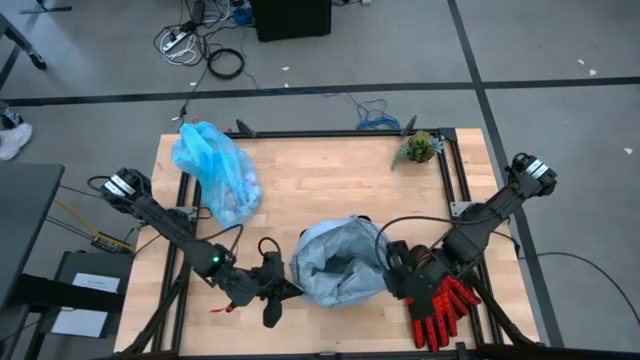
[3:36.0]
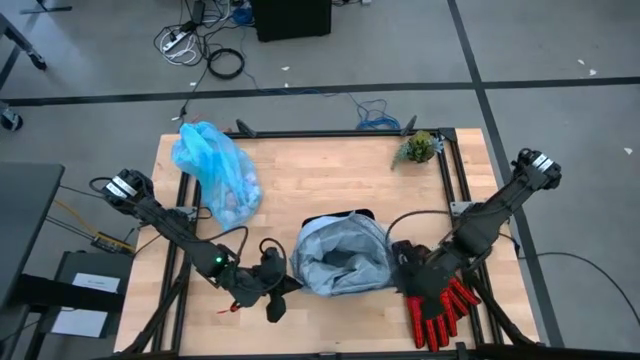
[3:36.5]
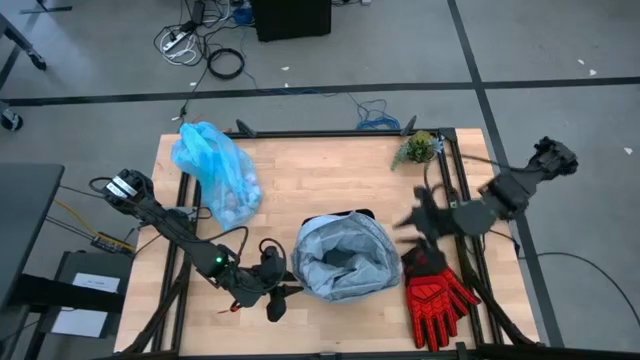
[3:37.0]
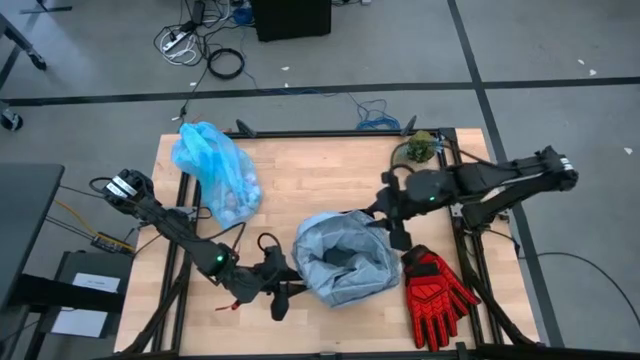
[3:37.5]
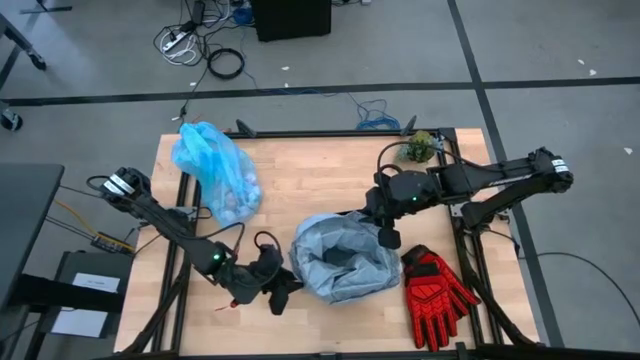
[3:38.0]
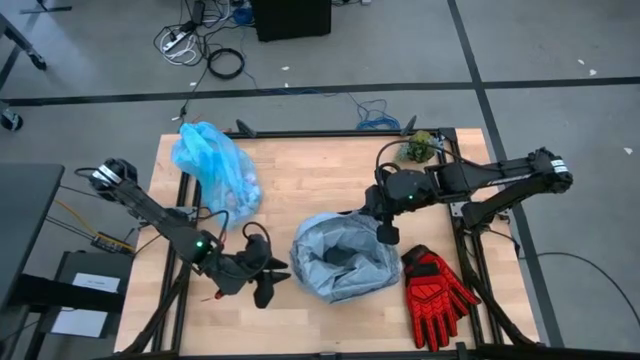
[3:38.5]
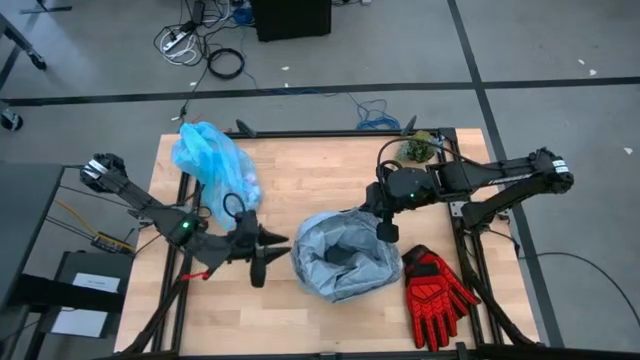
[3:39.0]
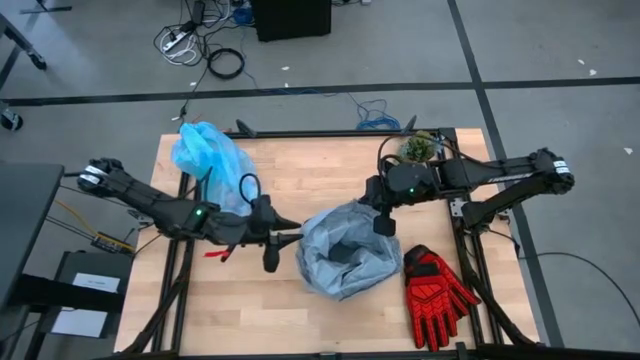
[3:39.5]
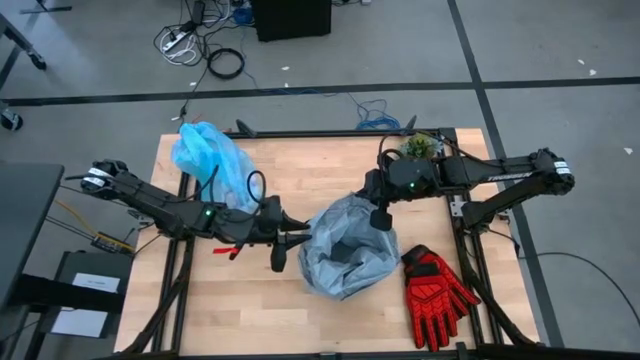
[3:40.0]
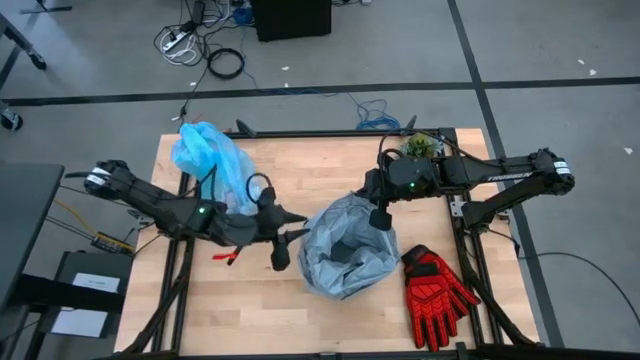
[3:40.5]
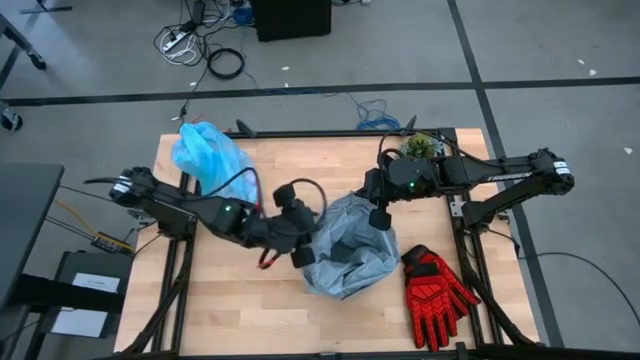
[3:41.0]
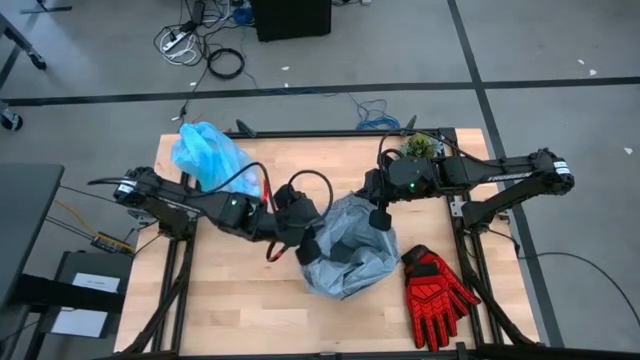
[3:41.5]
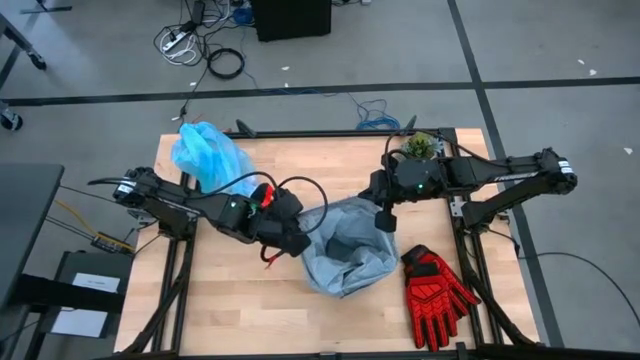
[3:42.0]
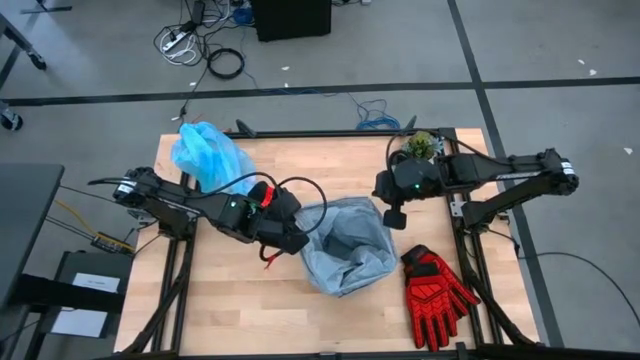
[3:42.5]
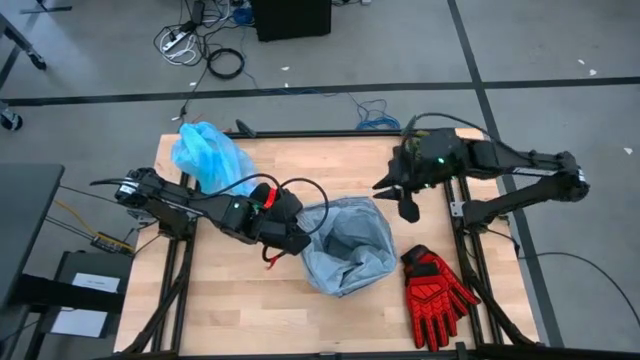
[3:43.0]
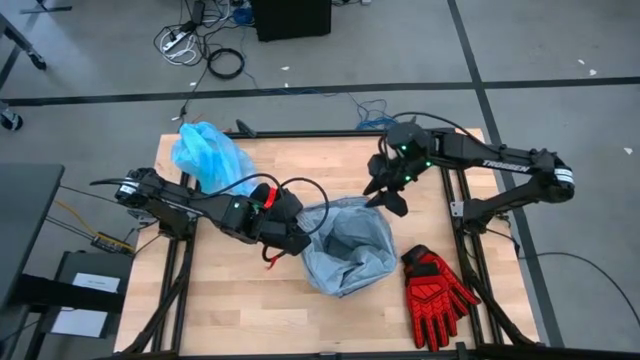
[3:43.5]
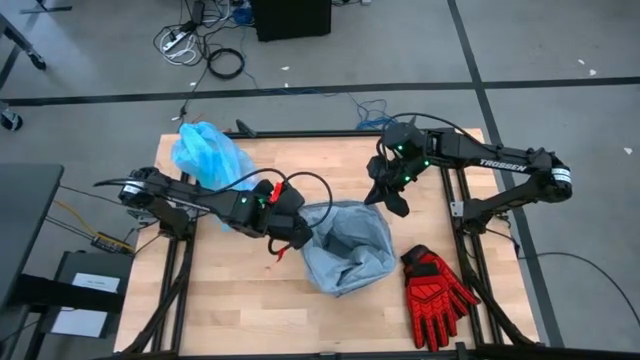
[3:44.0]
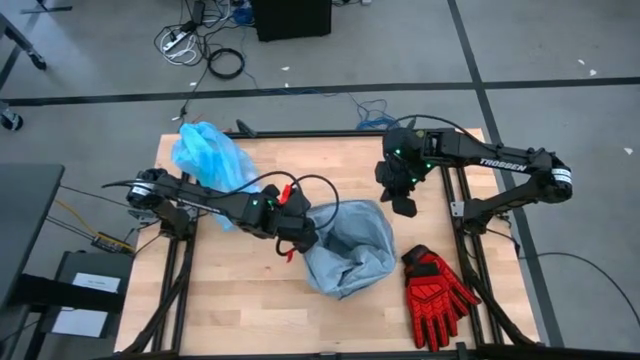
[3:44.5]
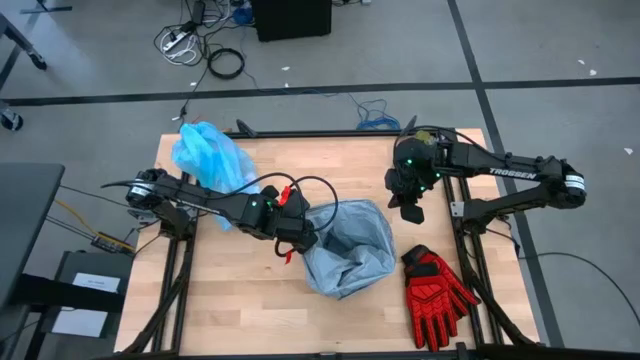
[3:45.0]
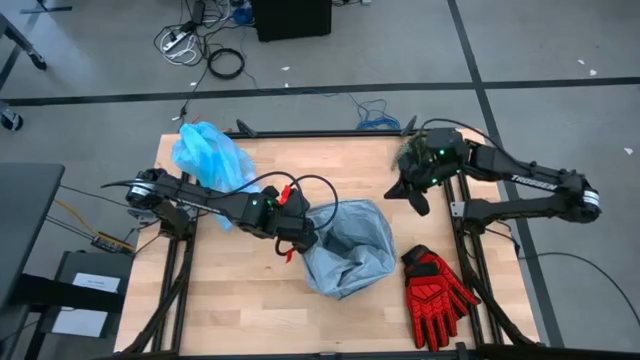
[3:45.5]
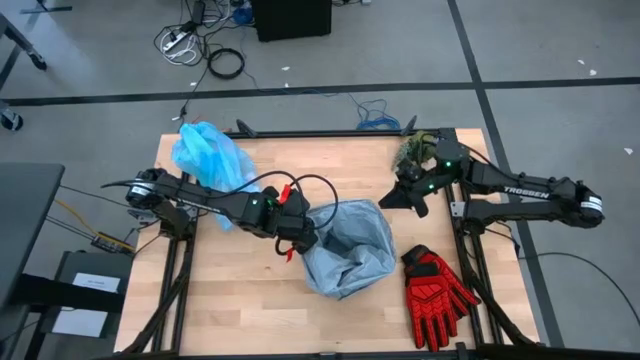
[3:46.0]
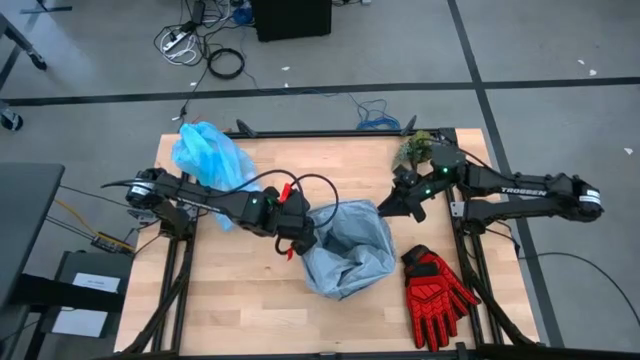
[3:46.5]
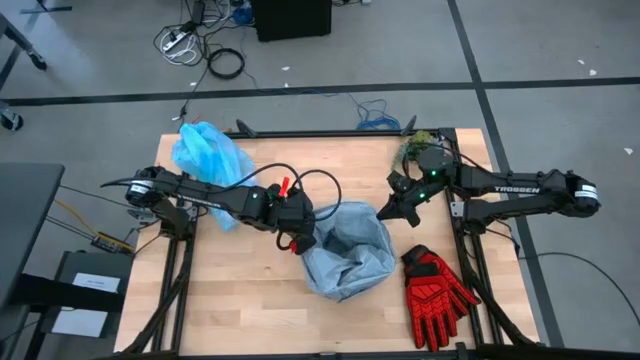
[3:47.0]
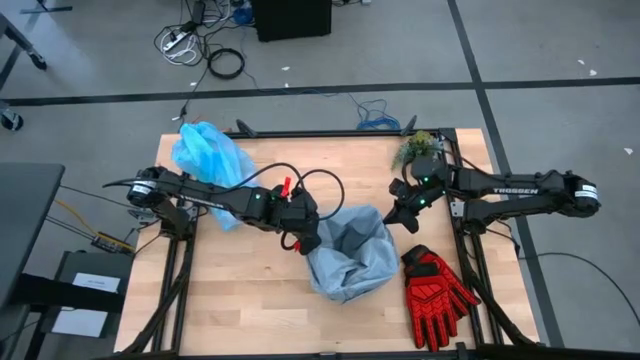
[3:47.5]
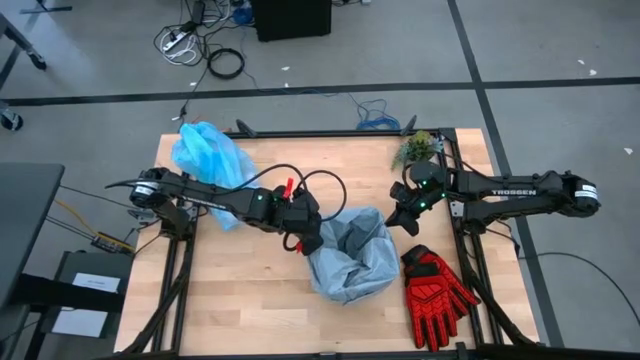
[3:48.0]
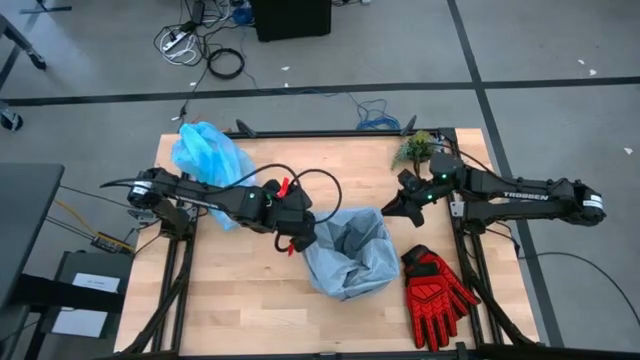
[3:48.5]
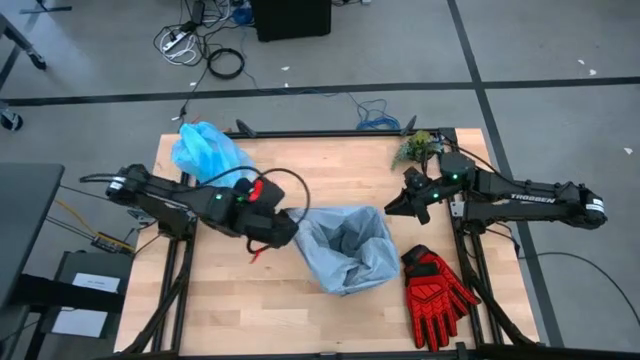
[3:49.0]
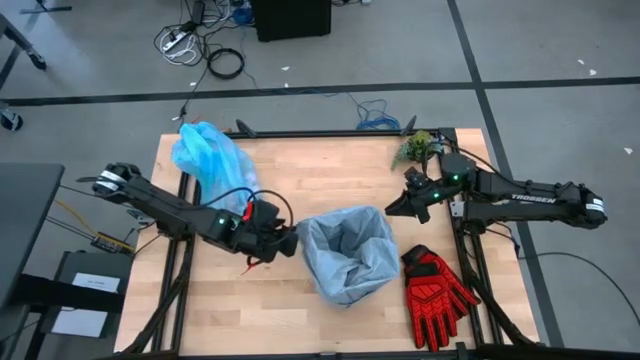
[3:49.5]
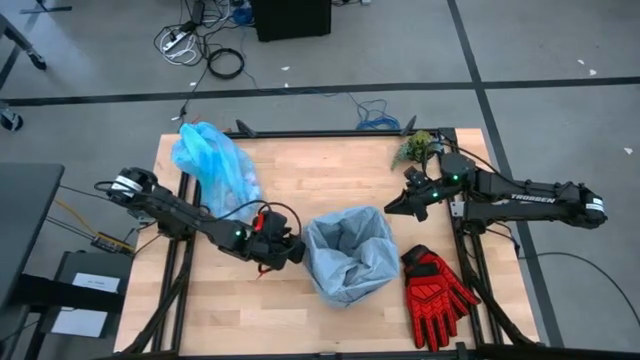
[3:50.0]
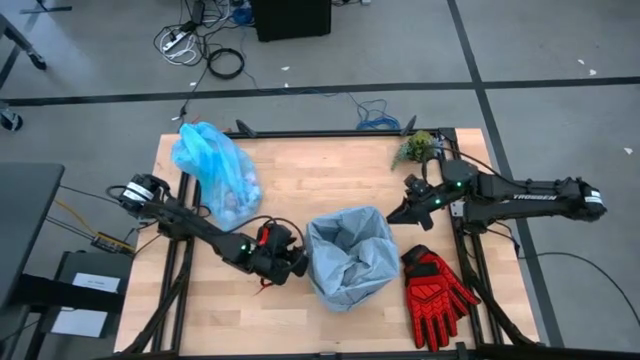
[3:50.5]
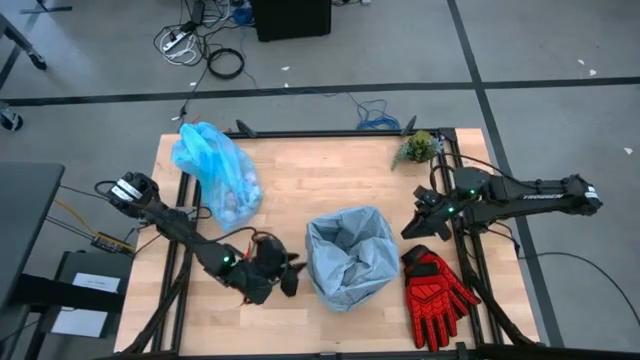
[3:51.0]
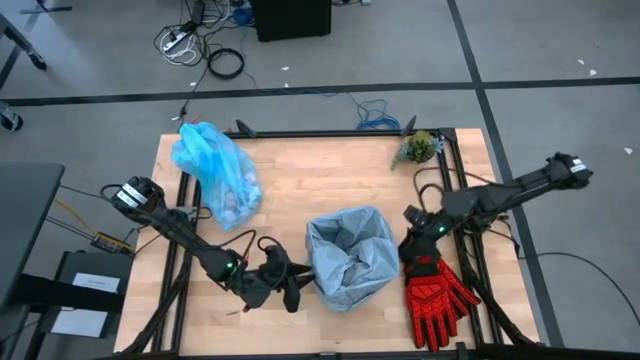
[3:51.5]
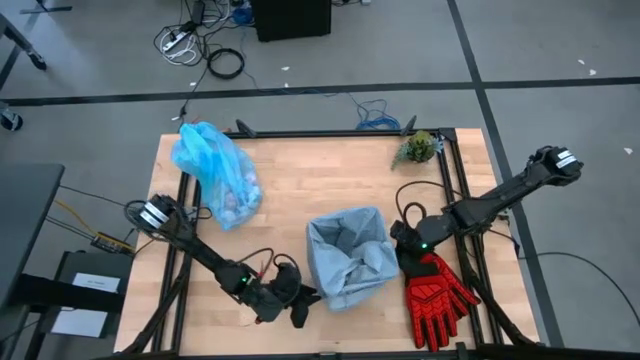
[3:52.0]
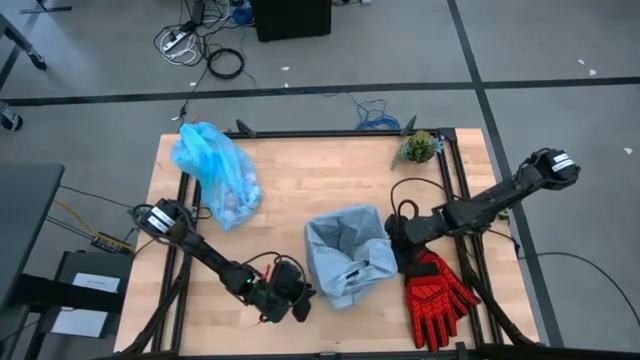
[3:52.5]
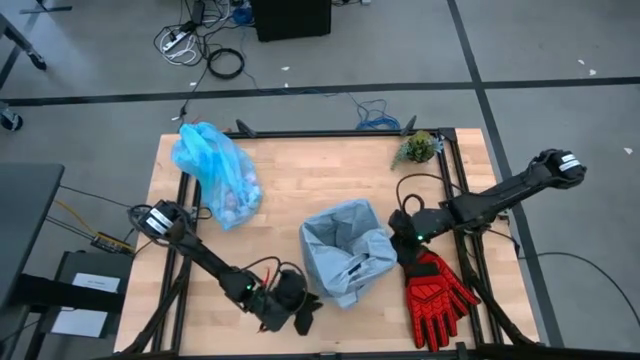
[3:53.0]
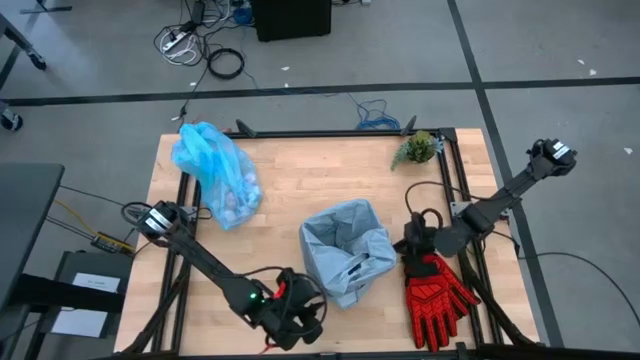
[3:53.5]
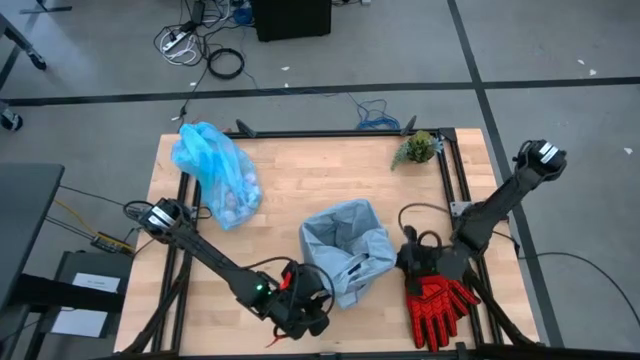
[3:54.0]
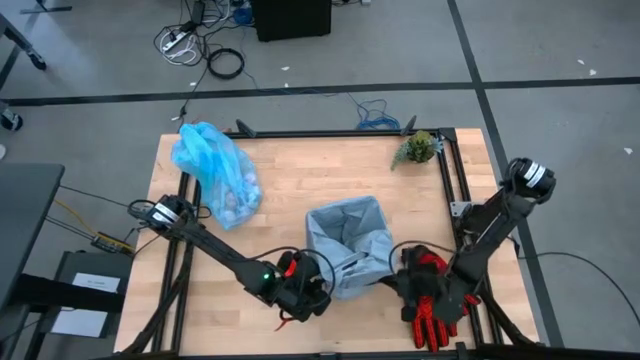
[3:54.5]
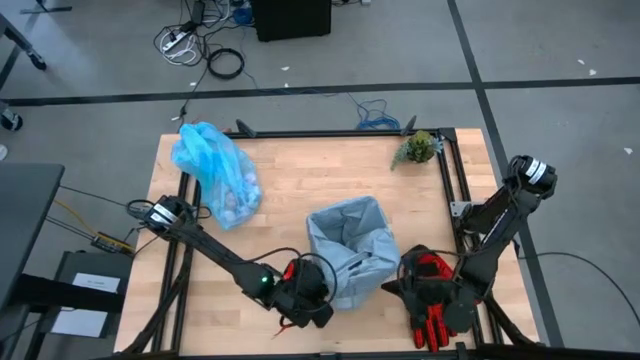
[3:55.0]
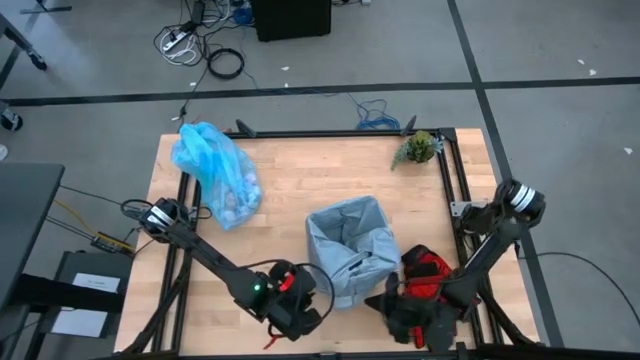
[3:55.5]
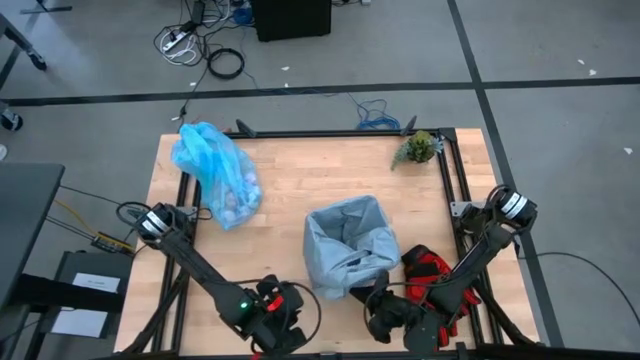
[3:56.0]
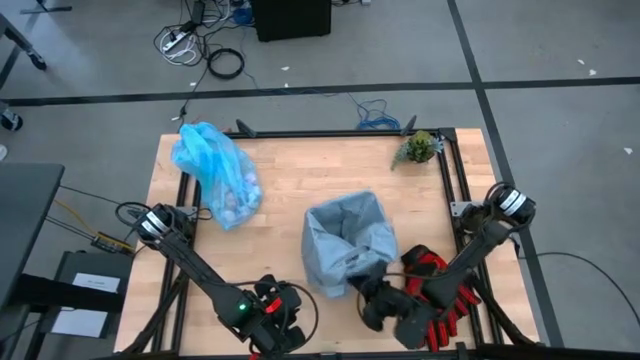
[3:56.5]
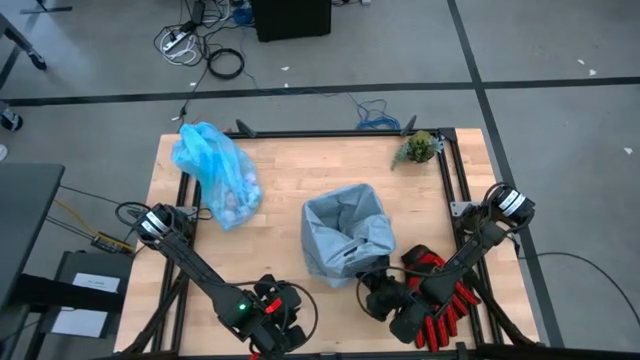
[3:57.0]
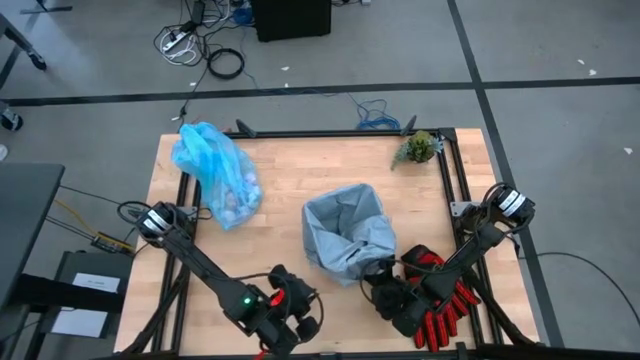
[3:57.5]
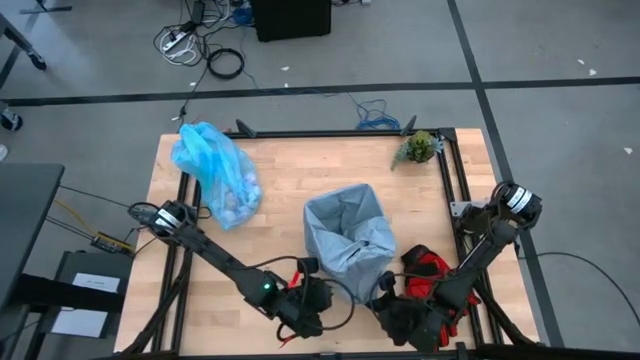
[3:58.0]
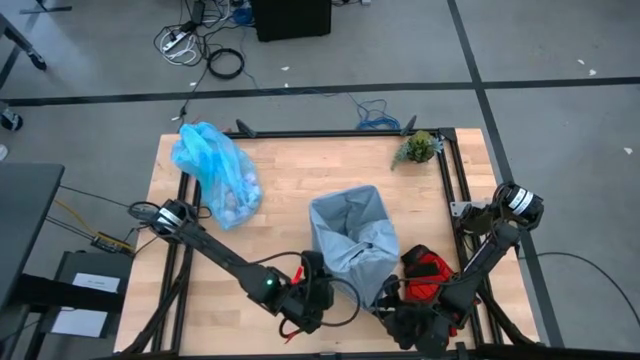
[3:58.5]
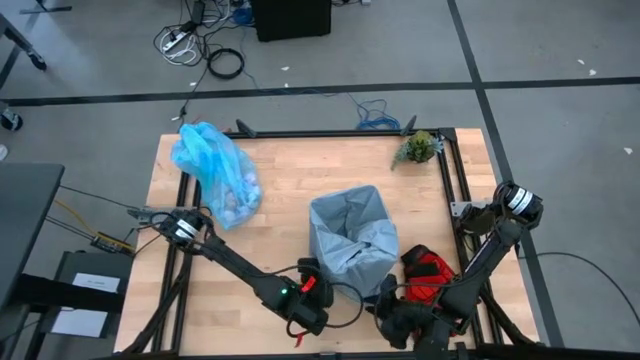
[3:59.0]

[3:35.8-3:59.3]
Task: place trash/remove bag and relplace
Put the gray trash bag into the trash bin
